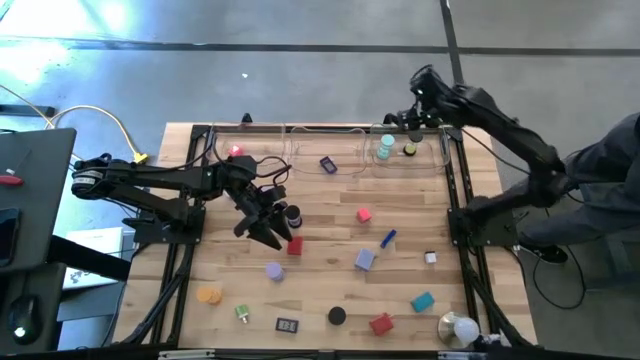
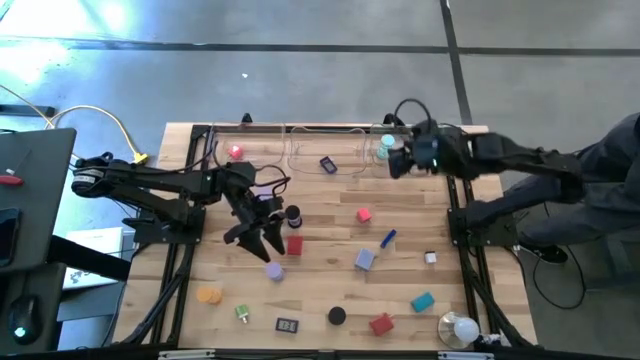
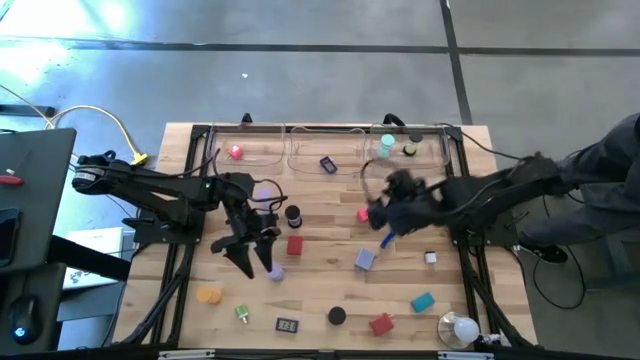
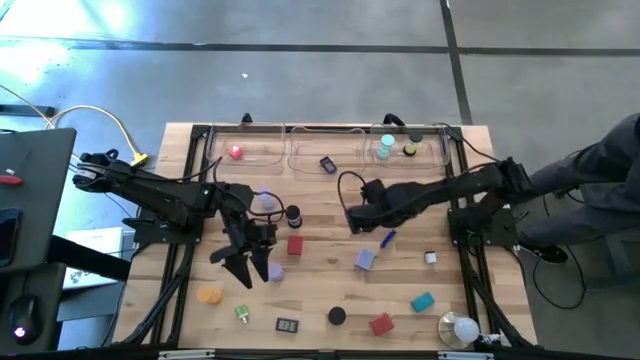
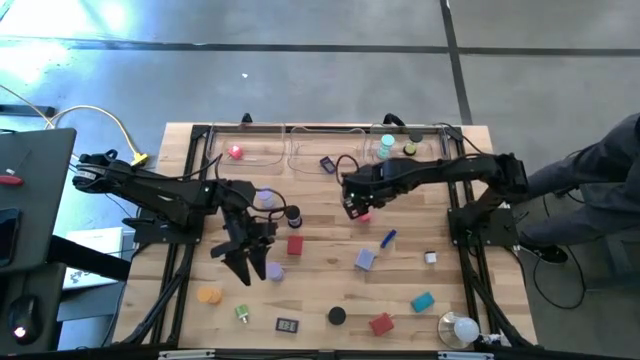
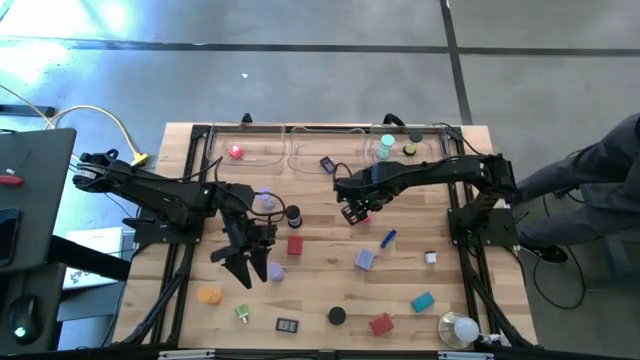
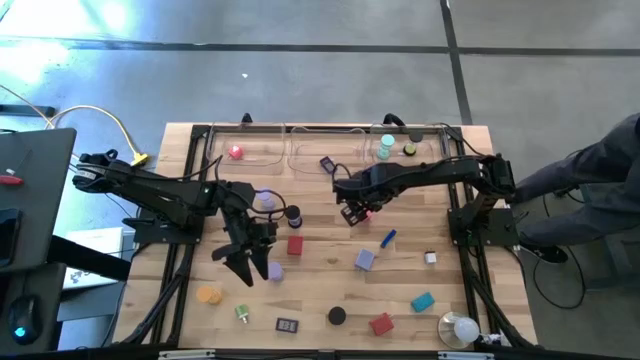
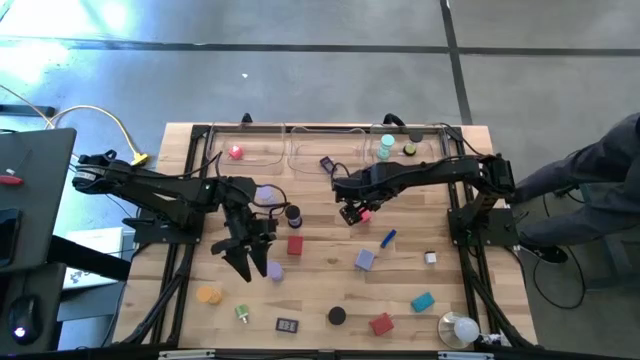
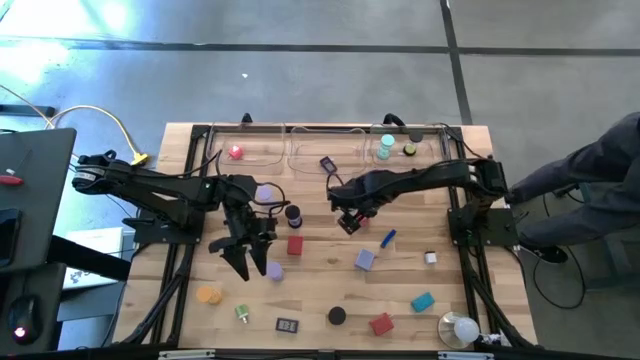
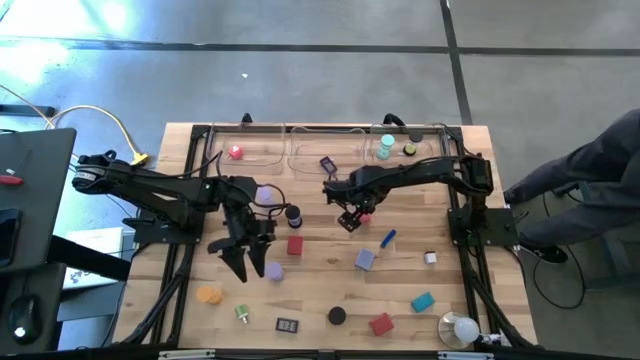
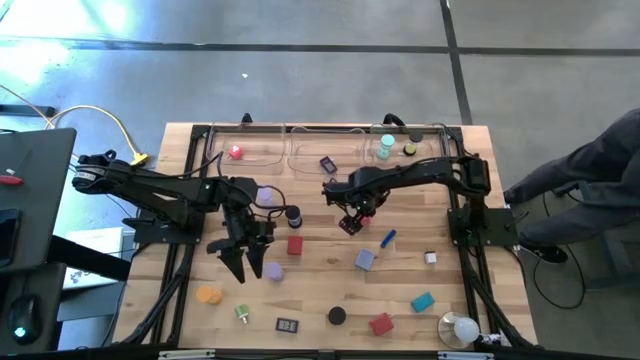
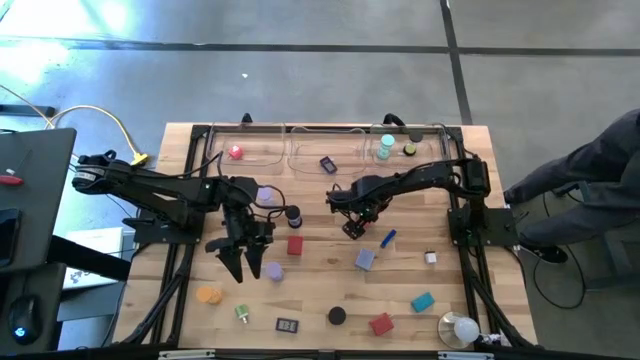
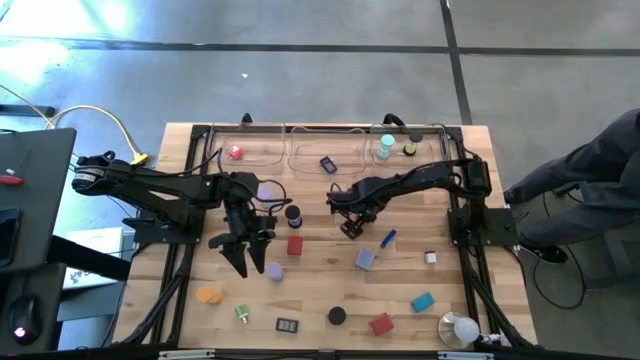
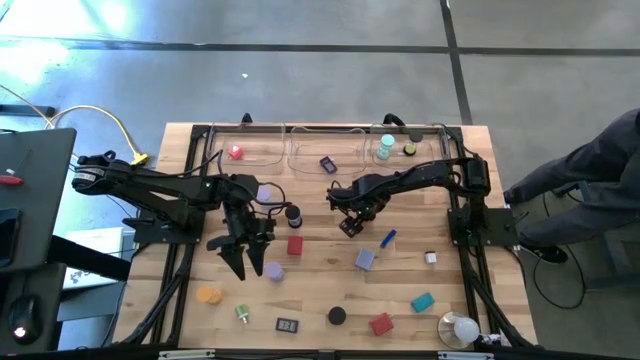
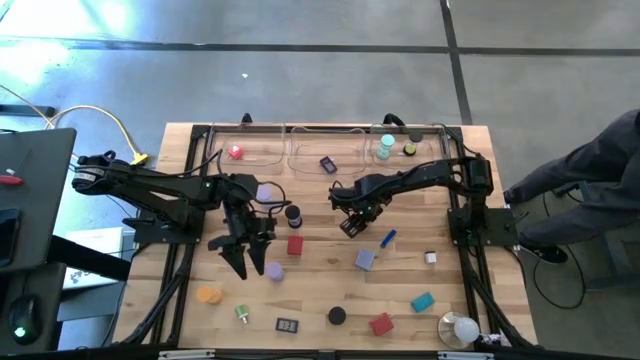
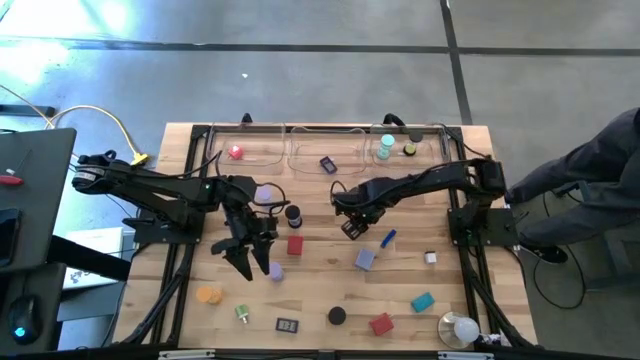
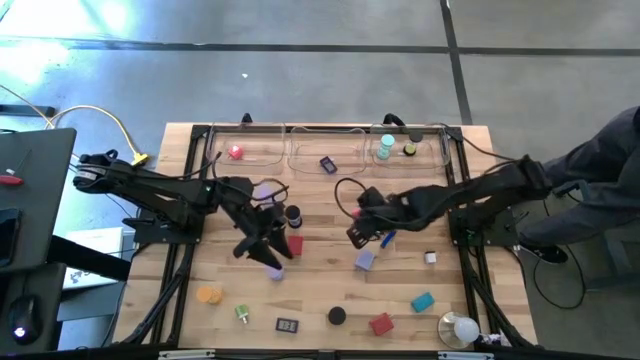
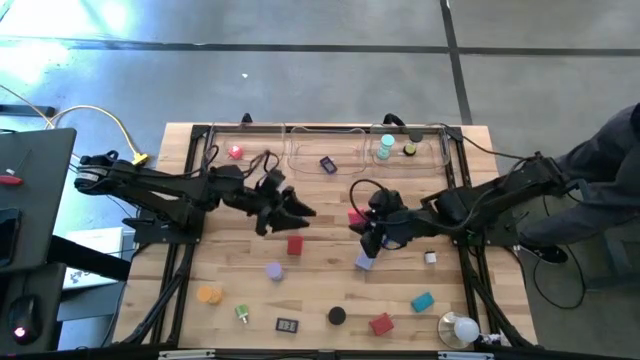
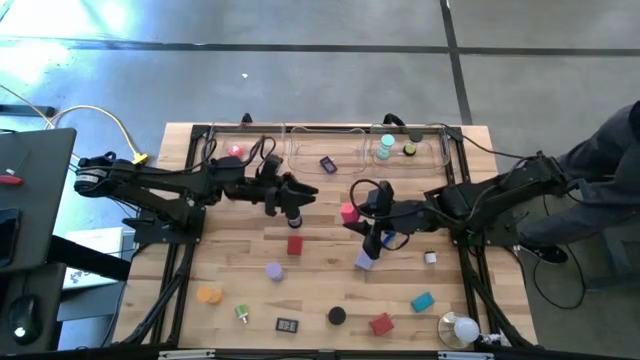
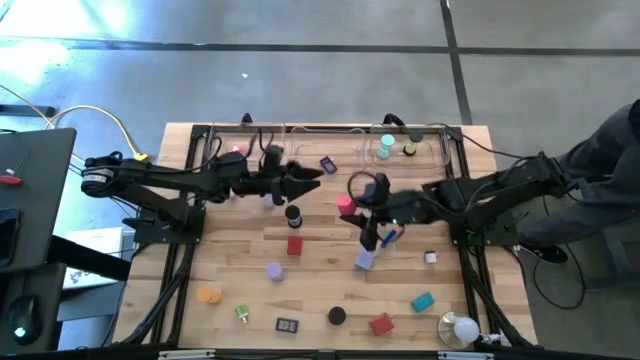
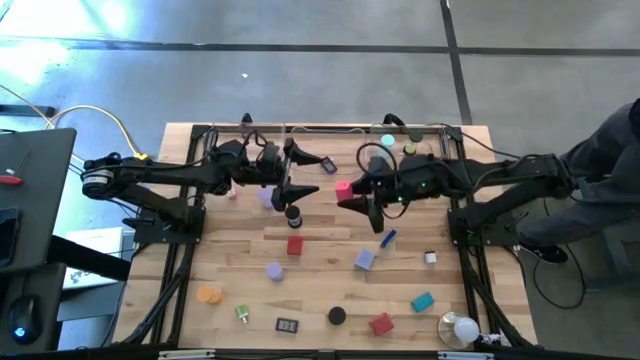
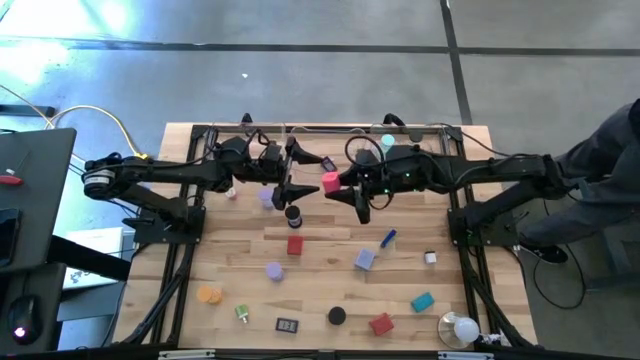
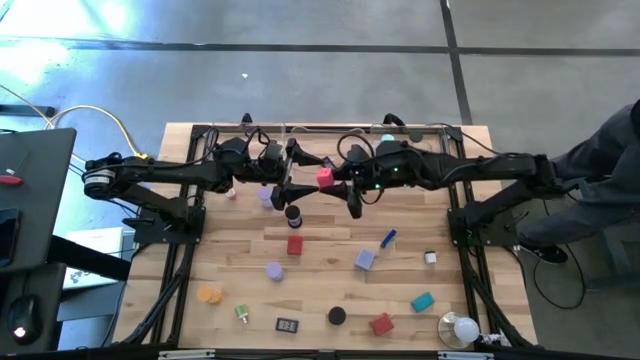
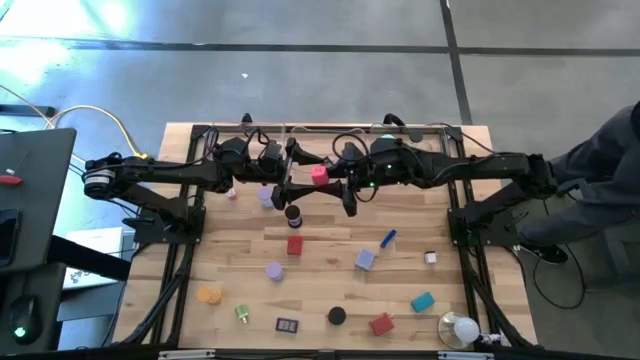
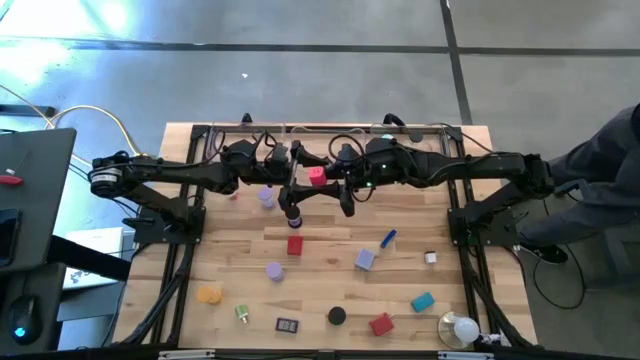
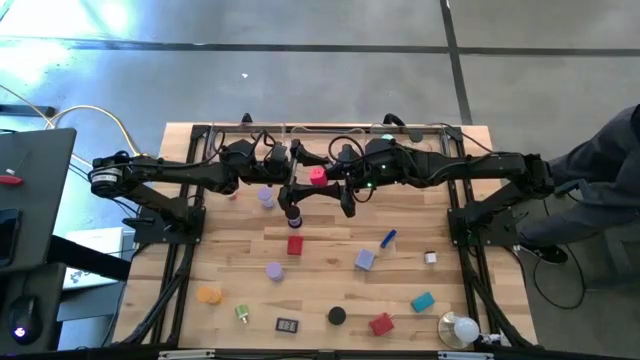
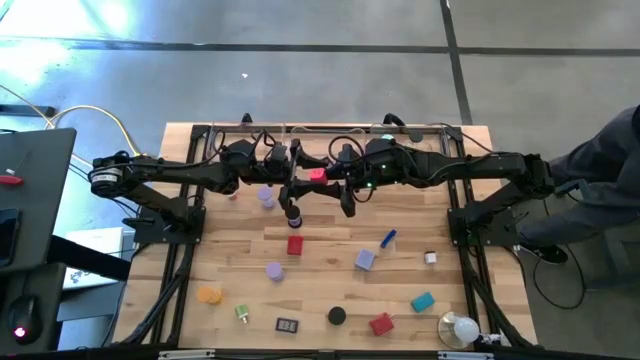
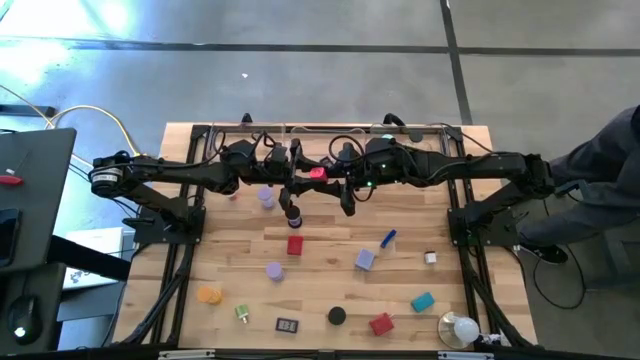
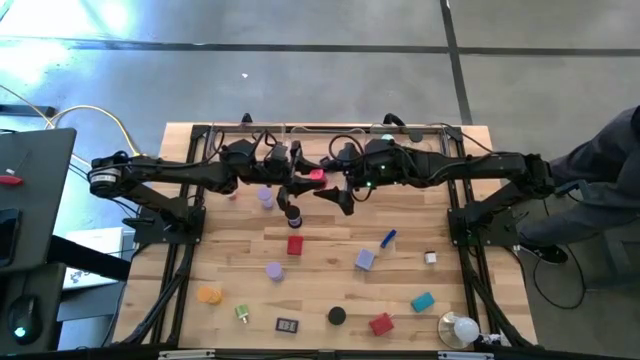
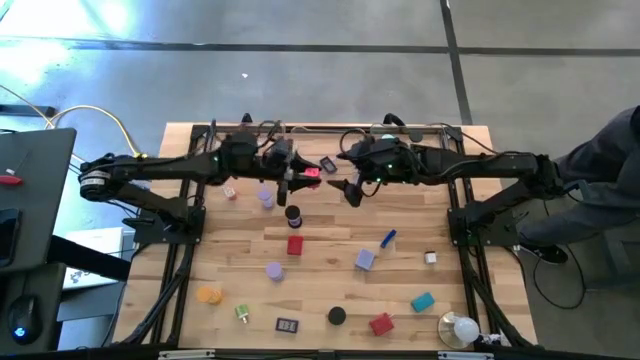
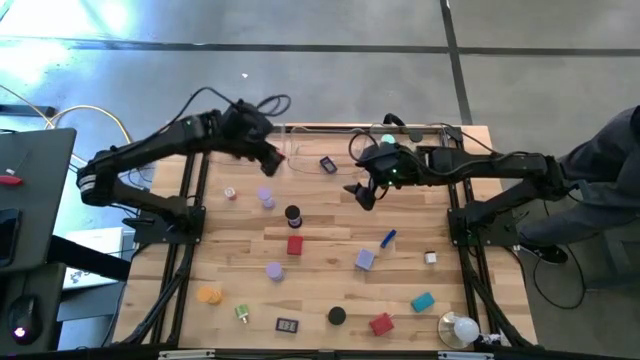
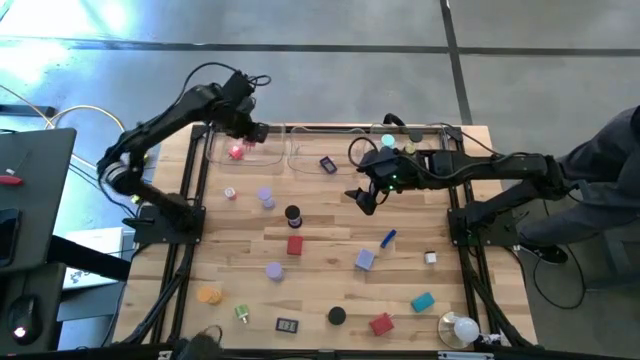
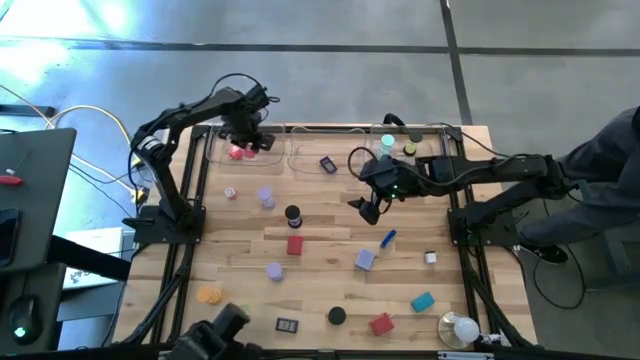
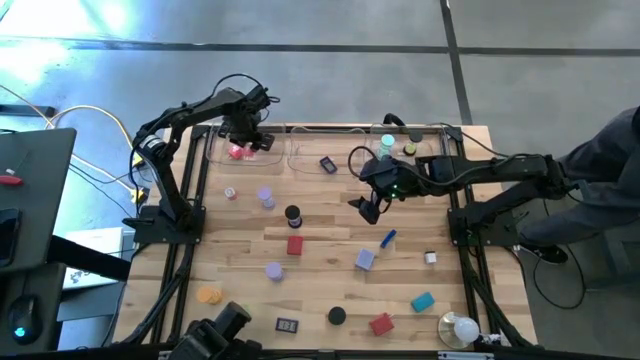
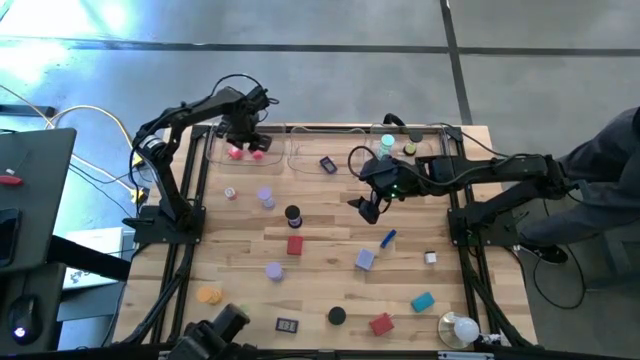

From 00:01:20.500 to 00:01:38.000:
Task: Pick & Place Office items
Put the right pink charger adapter into the left transparent bin

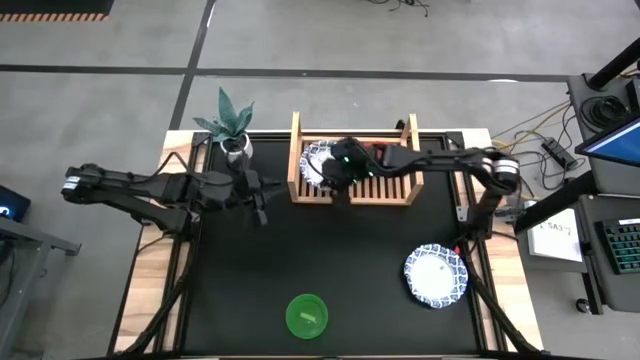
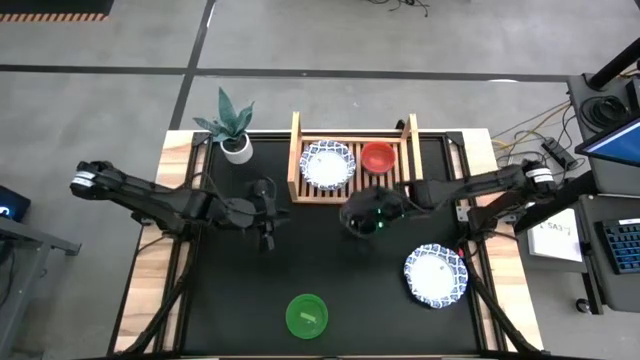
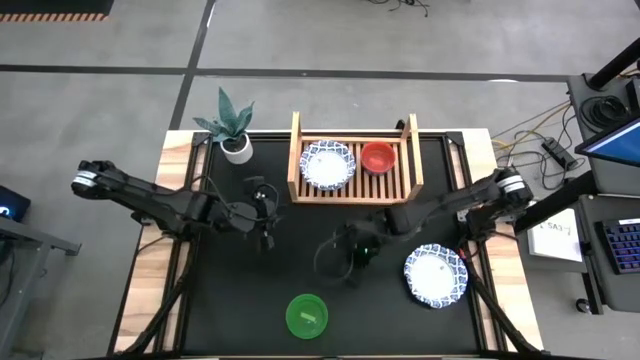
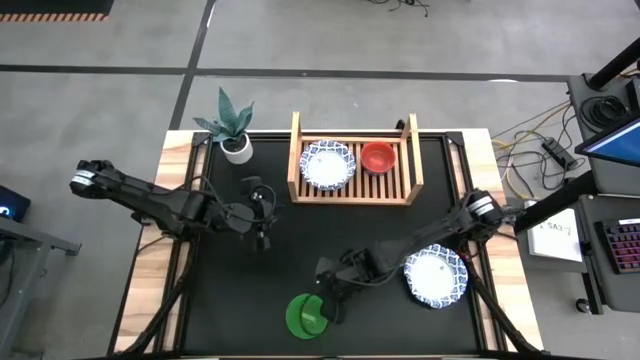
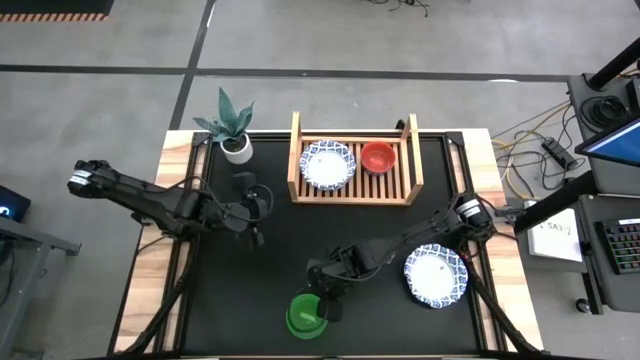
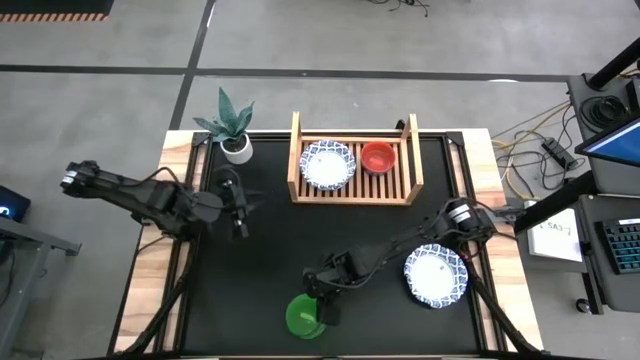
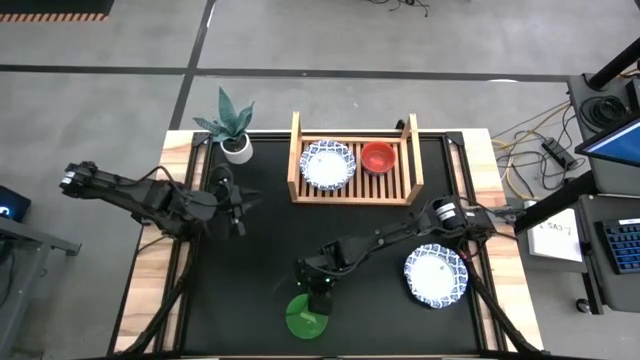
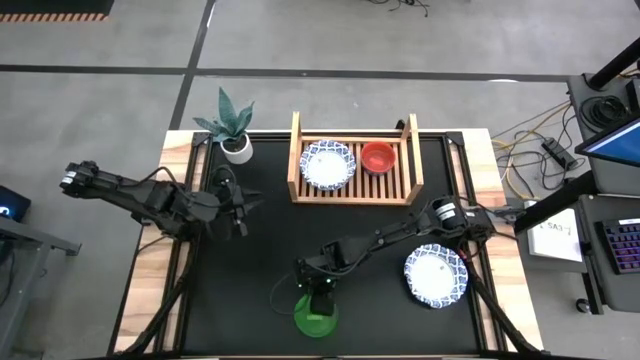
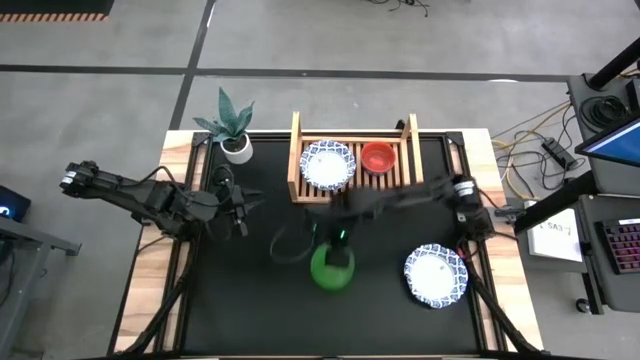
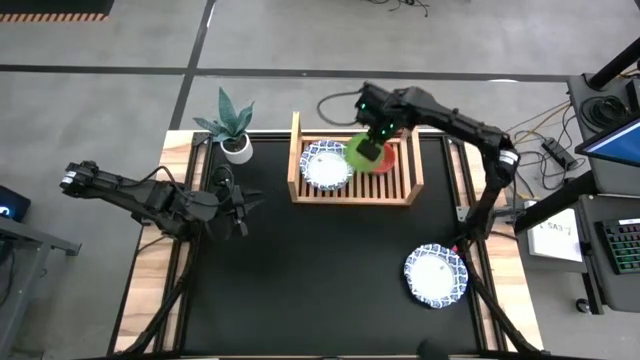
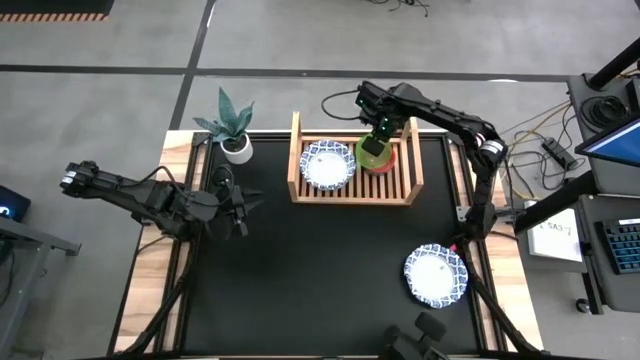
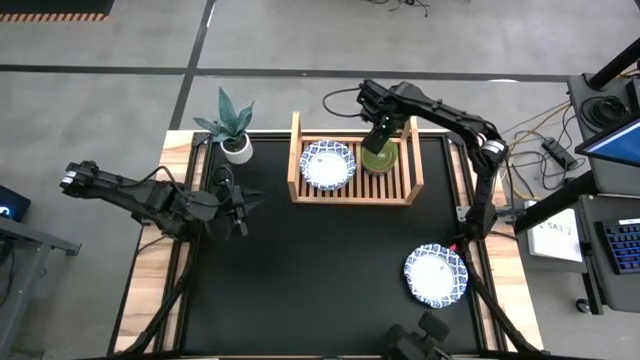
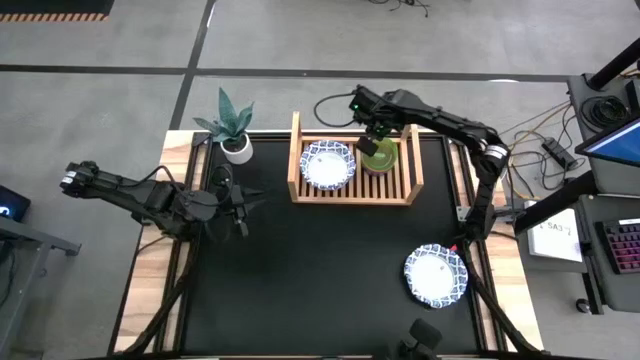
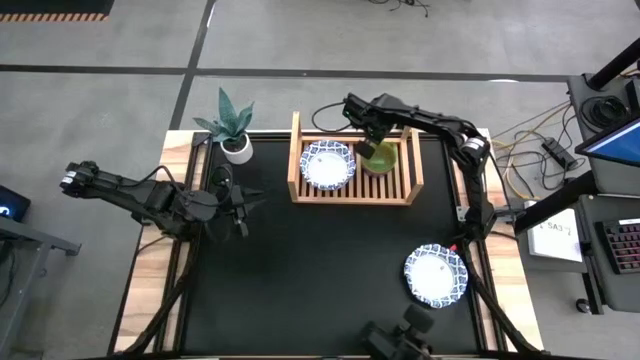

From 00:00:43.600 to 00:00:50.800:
Task: Place and stack bowls onto a shelf
Stack the green bowl on top of the orange bowl on the shelf
